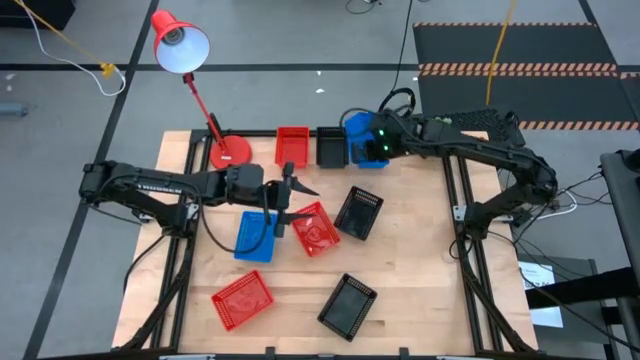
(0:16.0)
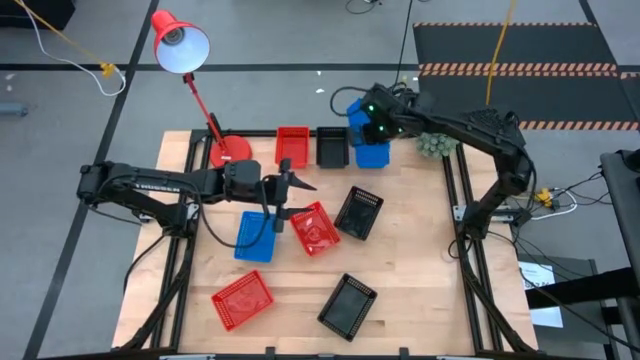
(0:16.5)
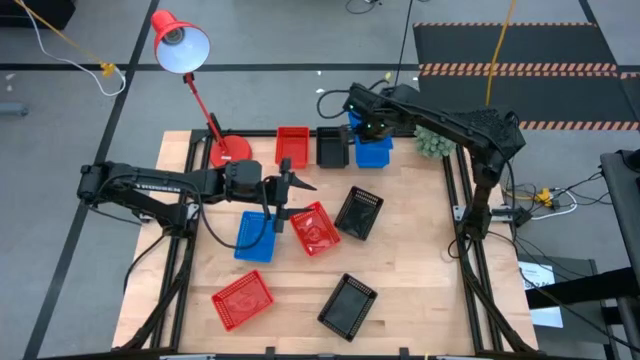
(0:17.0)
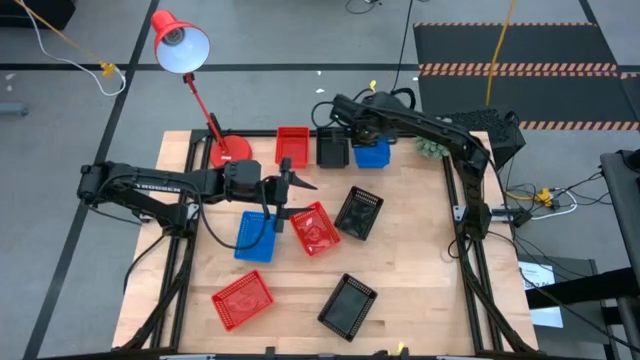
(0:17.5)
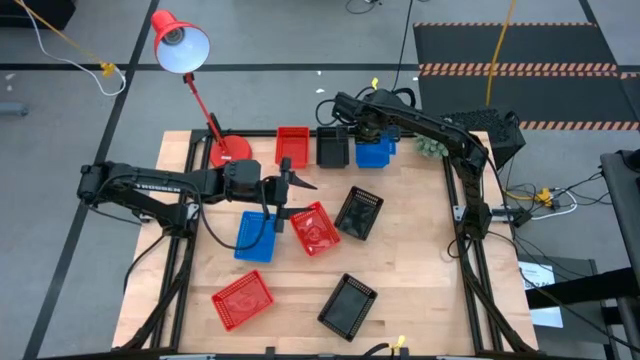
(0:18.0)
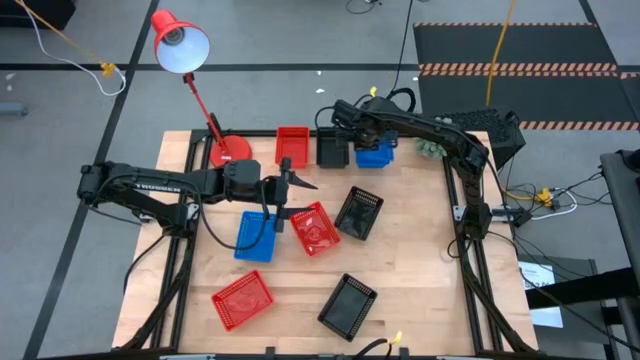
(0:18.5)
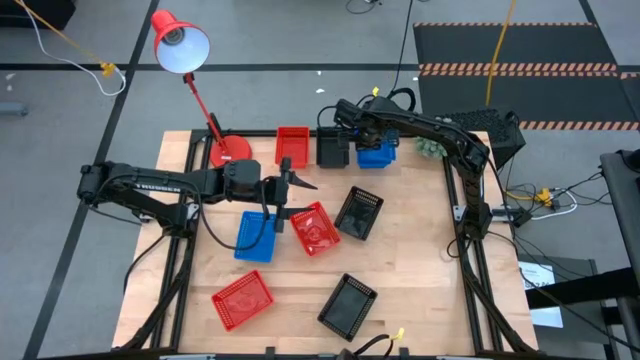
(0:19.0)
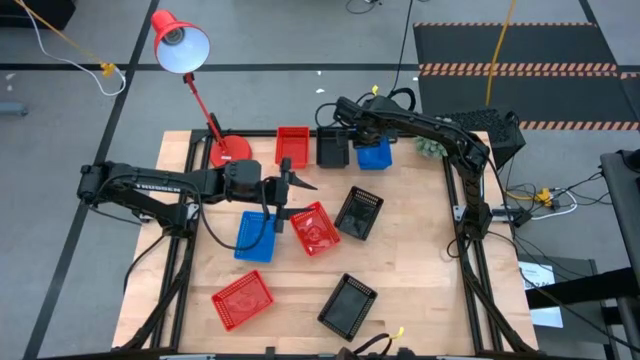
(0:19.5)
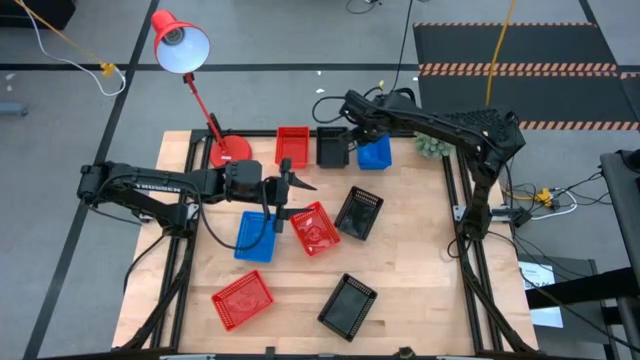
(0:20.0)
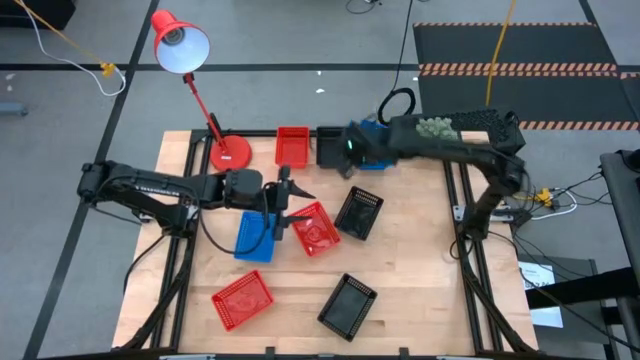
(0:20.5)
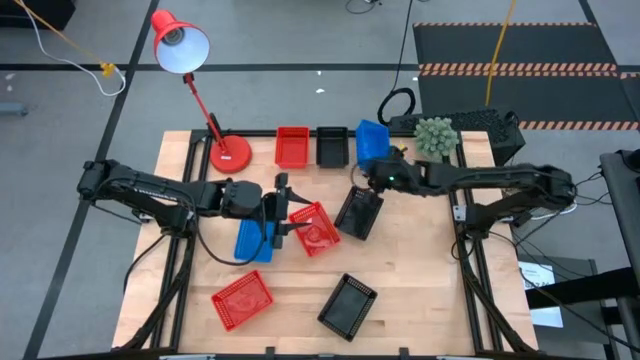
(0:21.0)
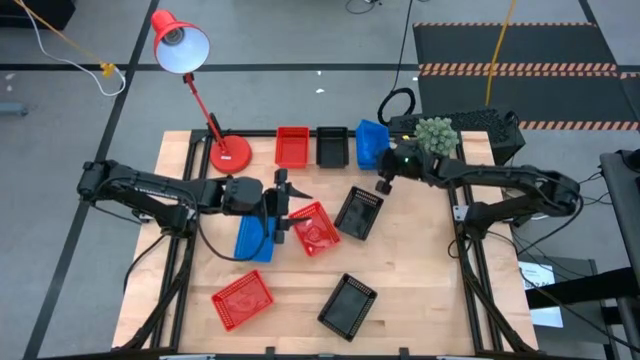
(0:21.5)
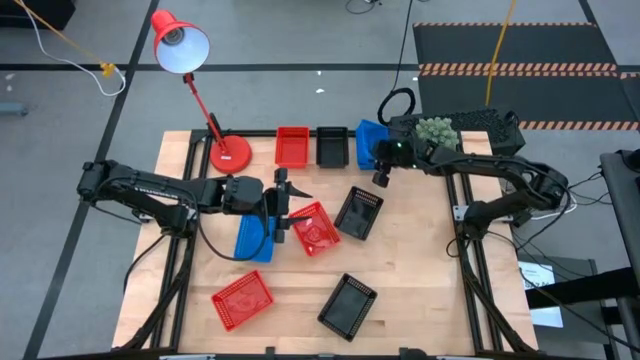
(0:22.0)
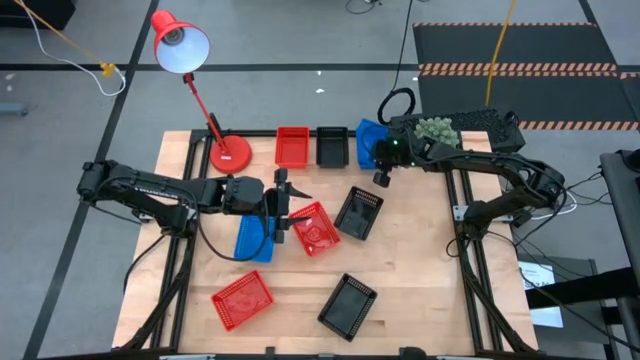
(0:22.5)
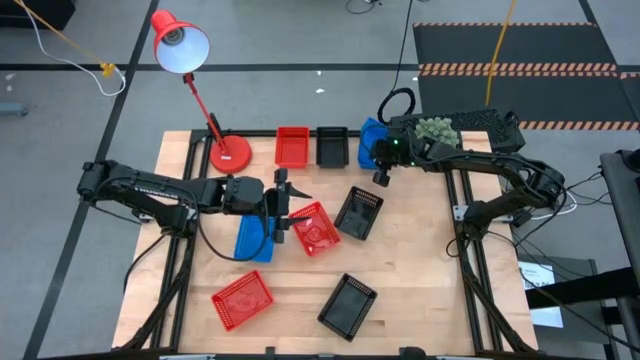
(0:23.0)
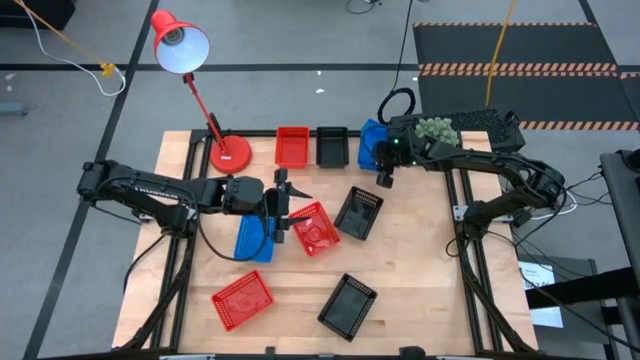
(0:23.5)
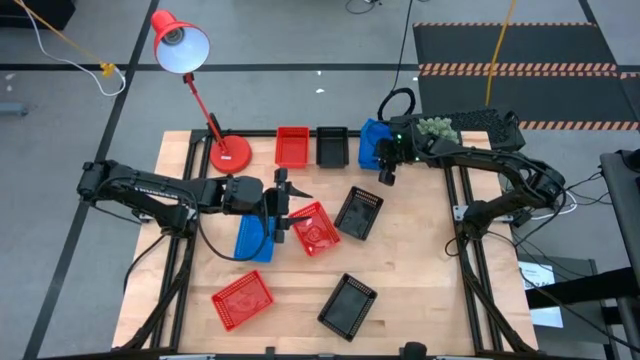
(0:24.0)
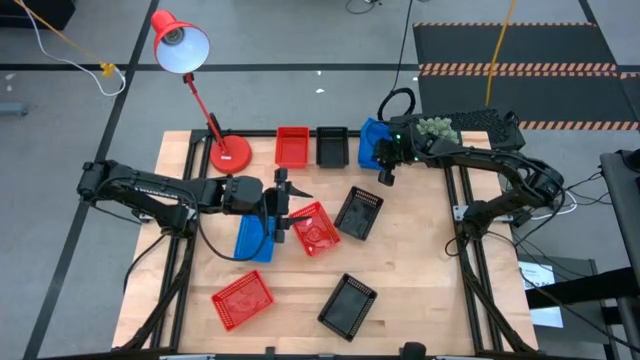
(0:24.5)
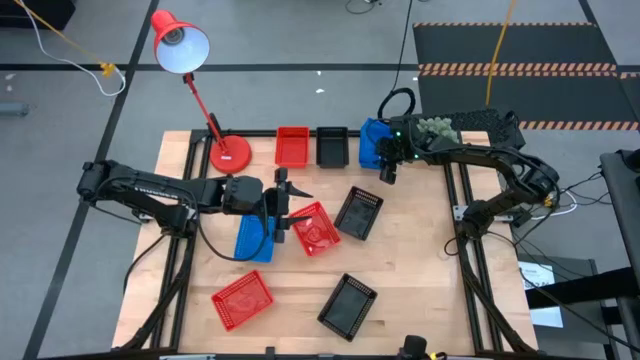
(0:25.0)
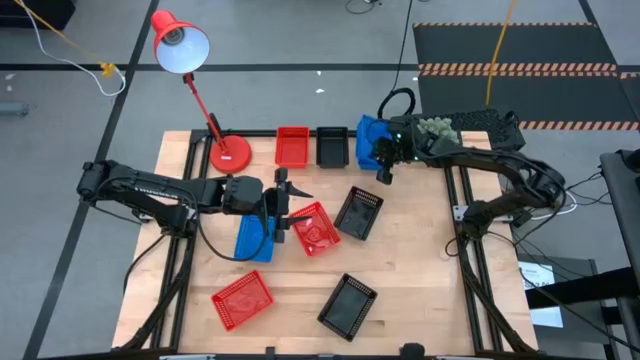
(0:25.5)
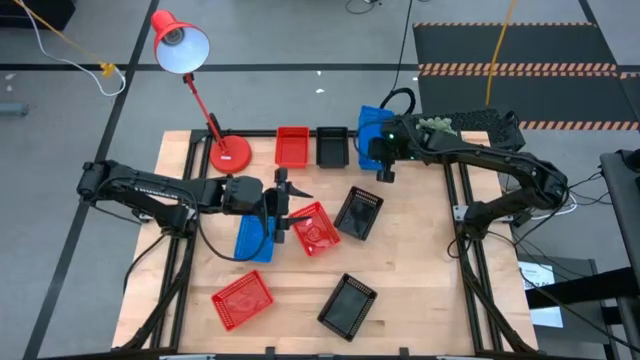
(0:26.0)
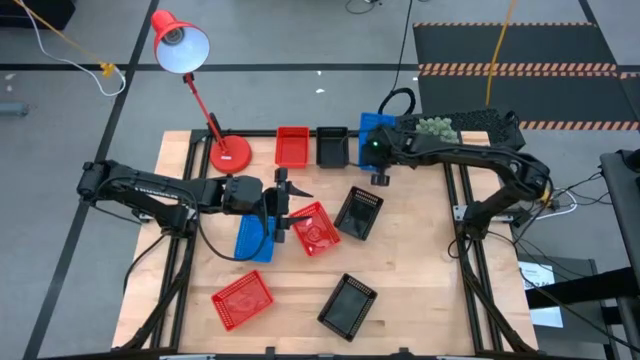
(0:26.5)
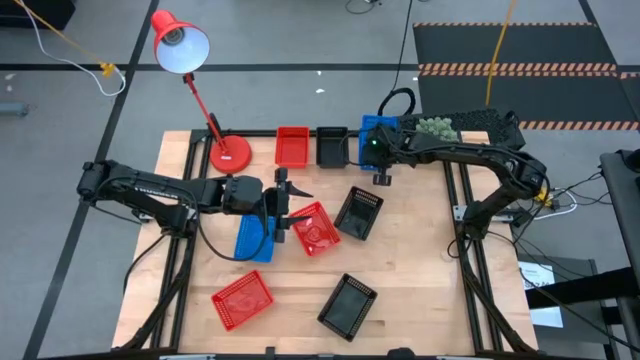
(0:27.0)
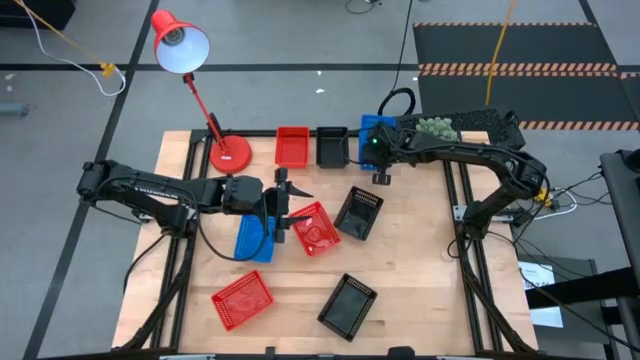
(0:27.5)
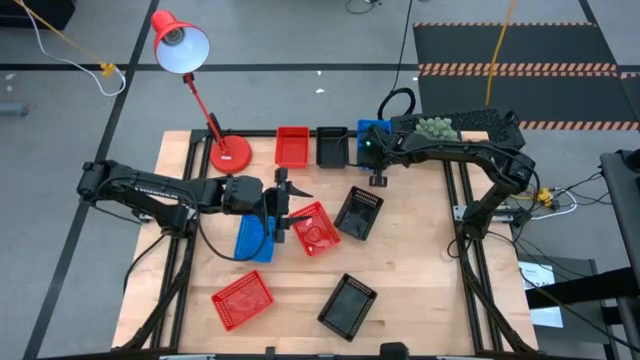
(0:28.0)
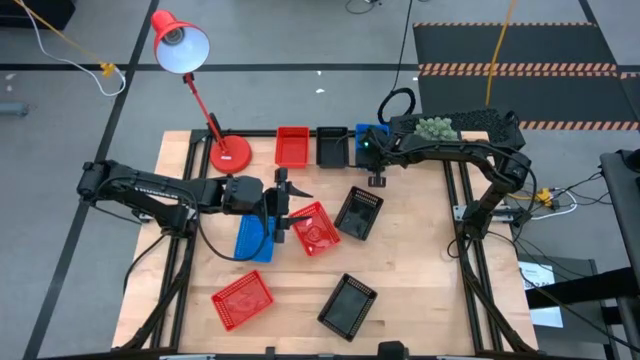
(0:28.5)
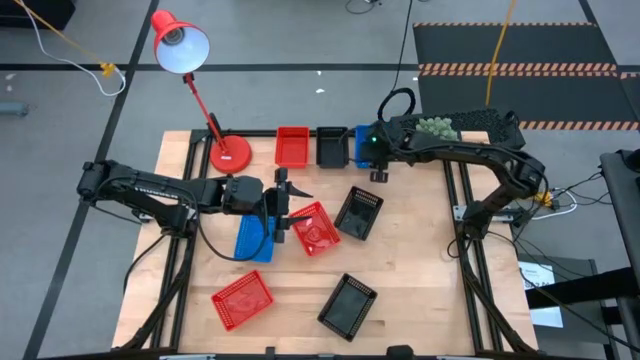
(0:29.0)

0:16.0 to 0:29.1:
Stack the bottom right blue bin on top of the top blue bin

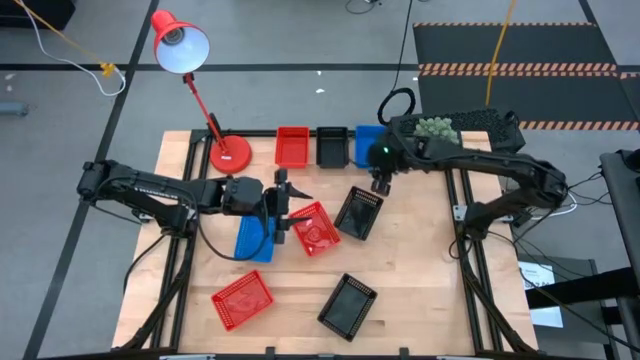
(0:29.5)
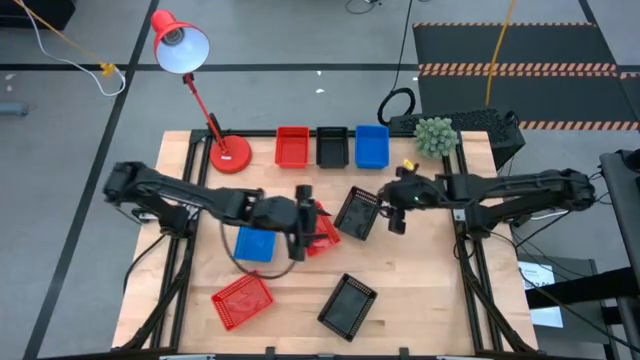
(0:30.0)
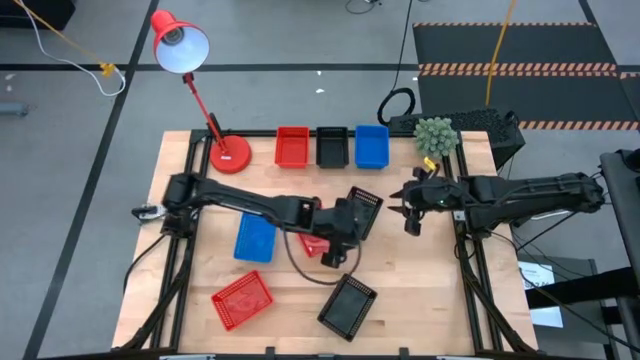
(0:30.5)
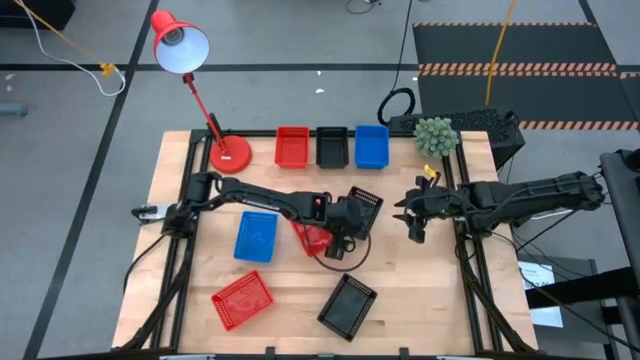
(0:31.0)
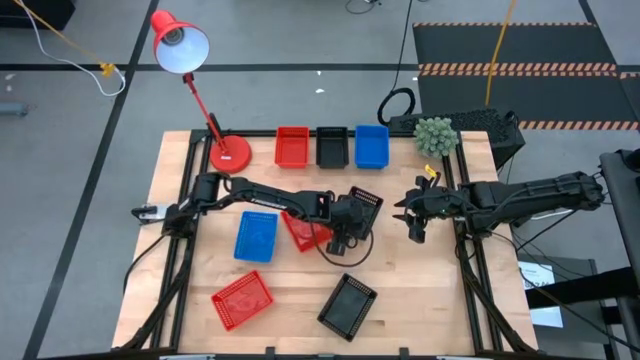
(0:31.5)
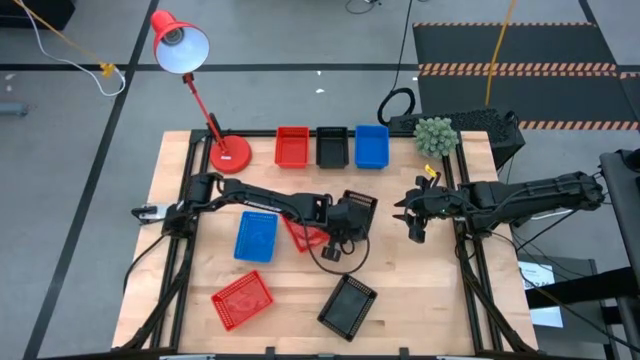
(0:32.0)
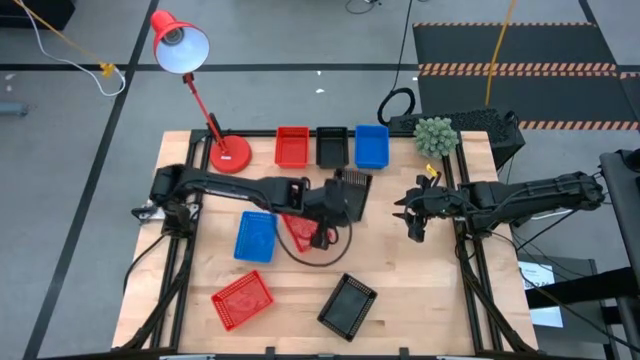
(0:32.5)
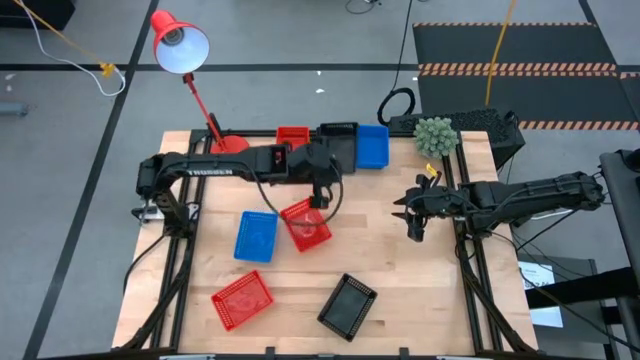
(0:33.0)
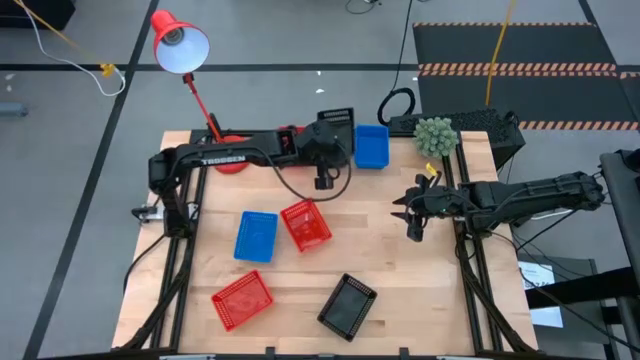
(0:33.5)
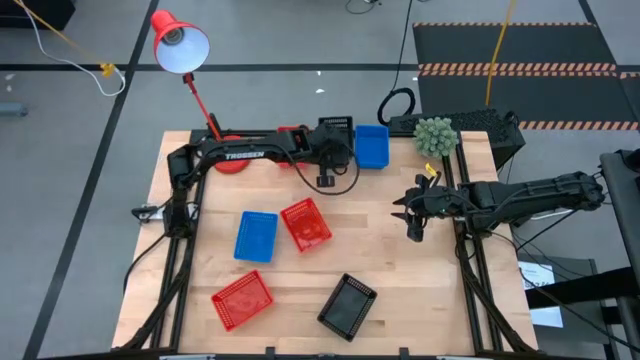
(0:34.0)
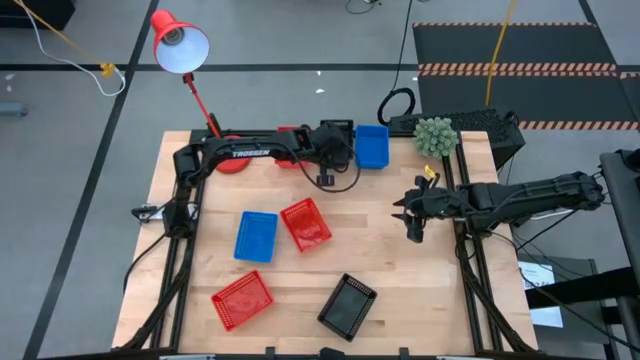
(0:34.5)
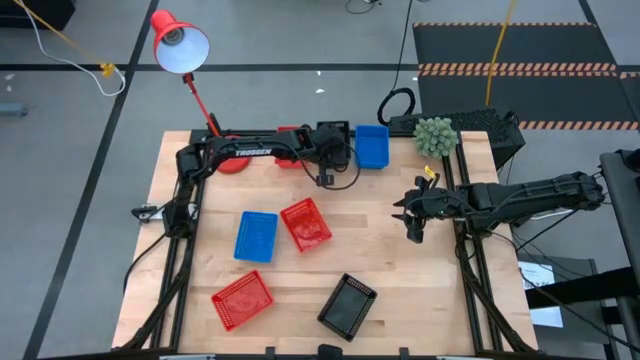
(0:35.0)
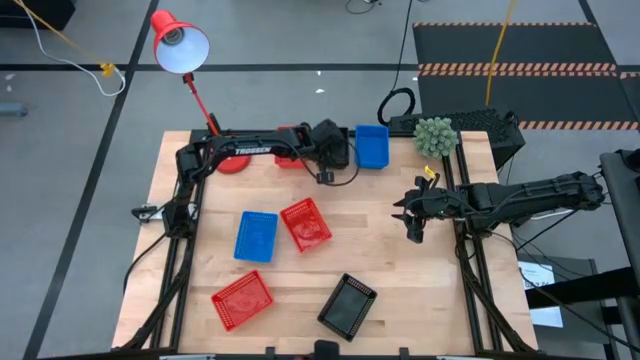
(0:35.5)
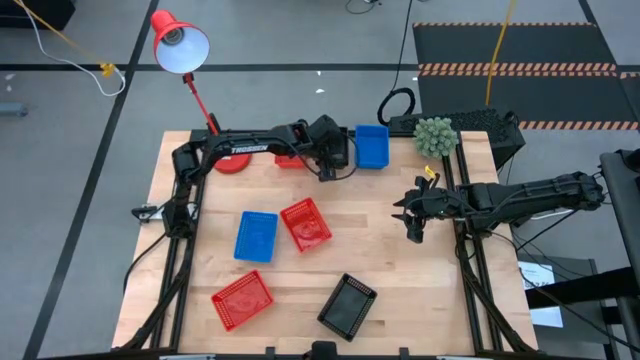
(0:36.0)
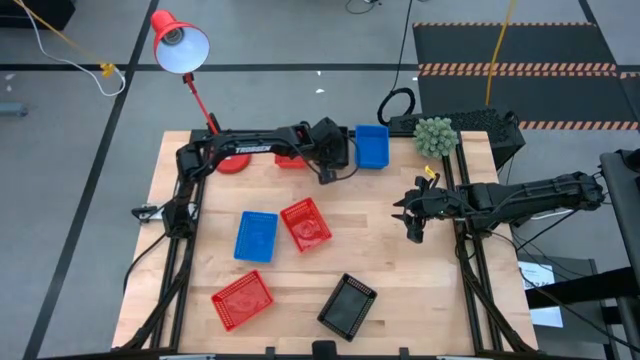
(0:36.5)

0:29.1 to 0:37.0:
Stack the middle black bin on top of the top black bin
